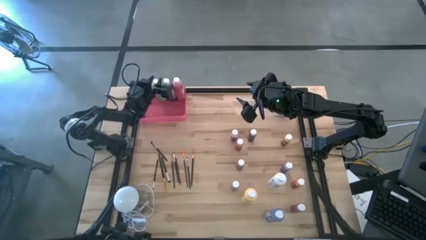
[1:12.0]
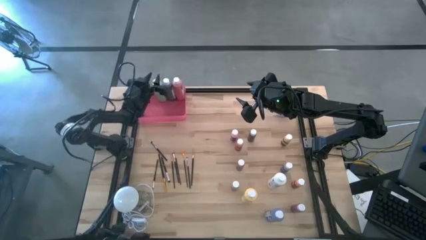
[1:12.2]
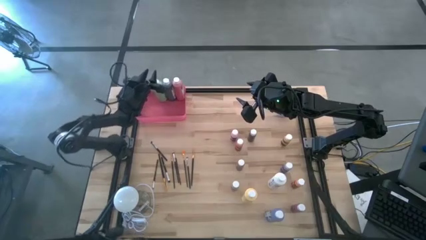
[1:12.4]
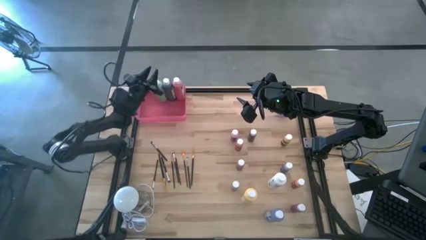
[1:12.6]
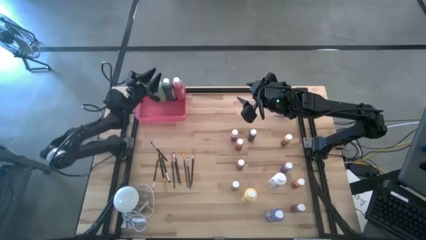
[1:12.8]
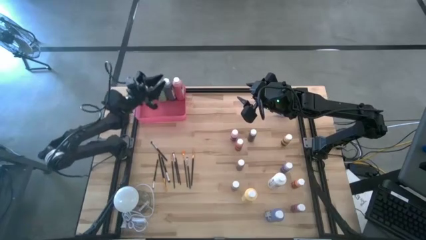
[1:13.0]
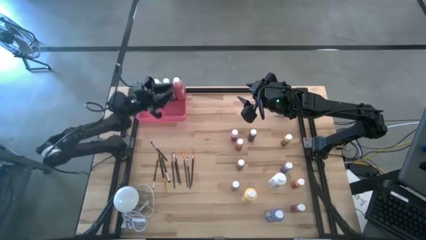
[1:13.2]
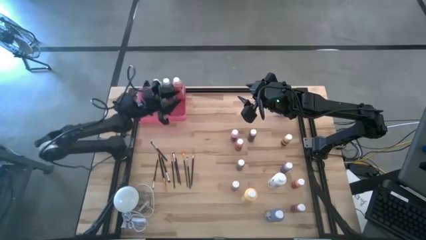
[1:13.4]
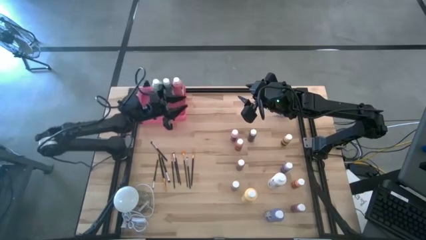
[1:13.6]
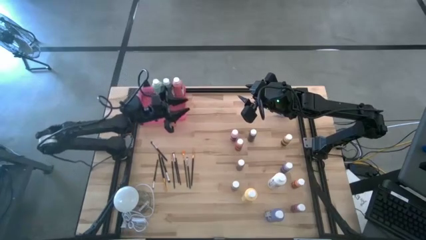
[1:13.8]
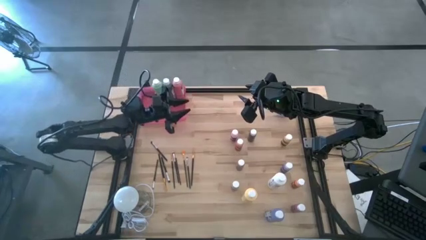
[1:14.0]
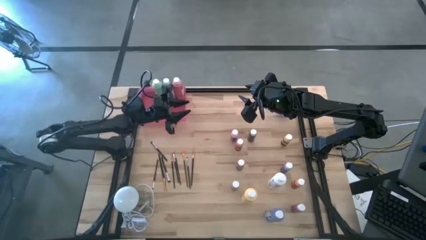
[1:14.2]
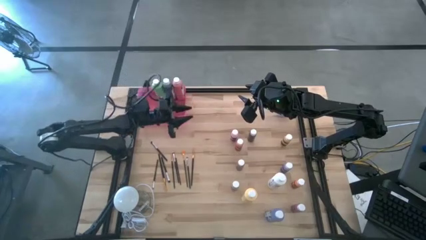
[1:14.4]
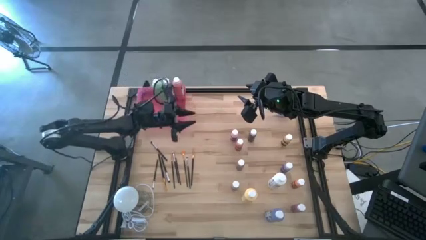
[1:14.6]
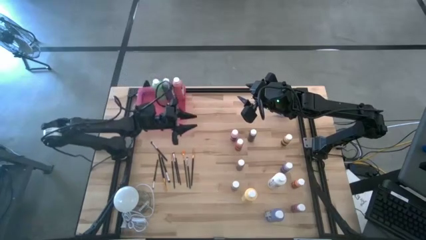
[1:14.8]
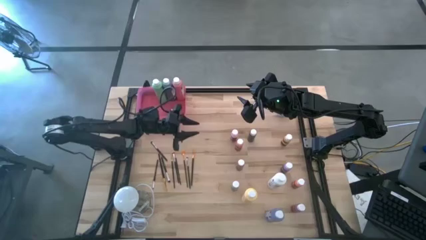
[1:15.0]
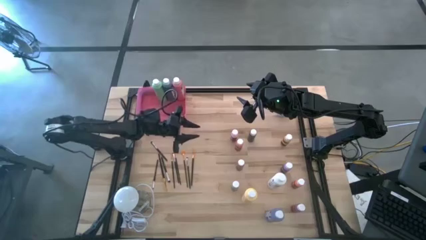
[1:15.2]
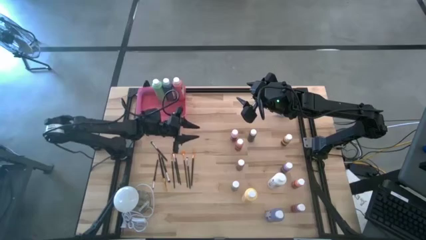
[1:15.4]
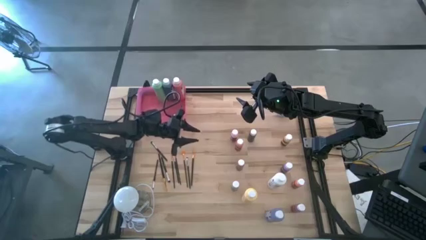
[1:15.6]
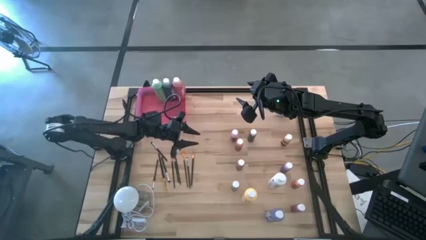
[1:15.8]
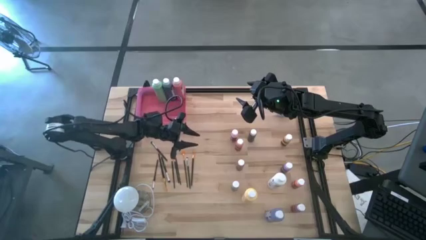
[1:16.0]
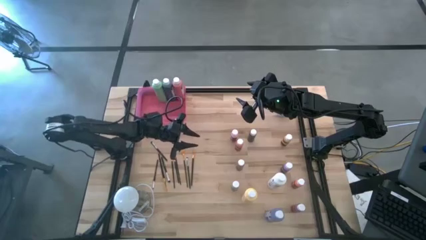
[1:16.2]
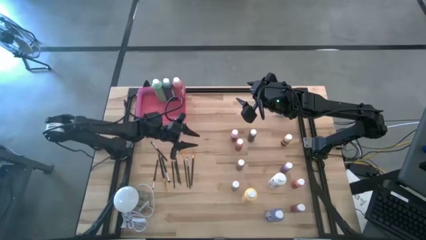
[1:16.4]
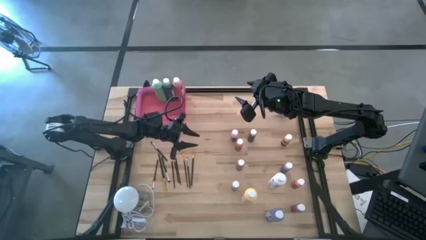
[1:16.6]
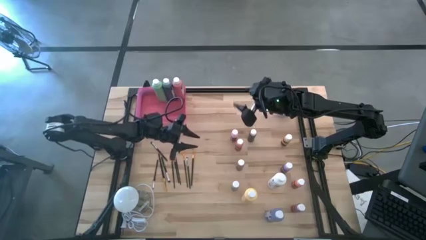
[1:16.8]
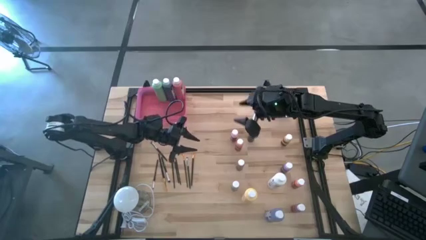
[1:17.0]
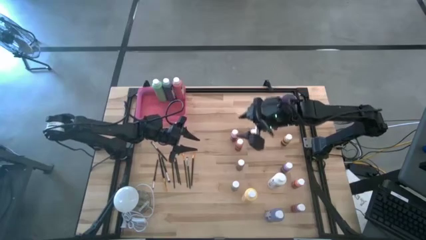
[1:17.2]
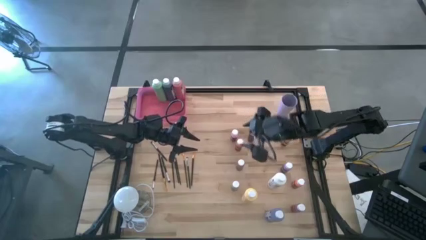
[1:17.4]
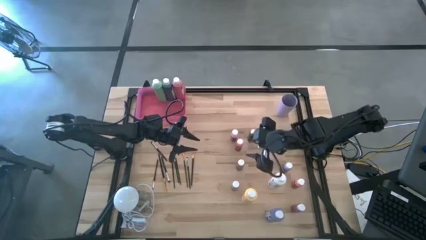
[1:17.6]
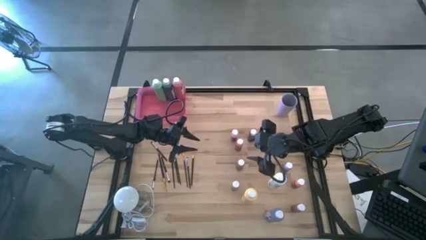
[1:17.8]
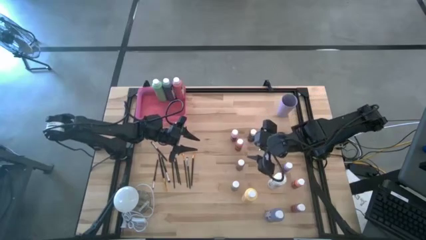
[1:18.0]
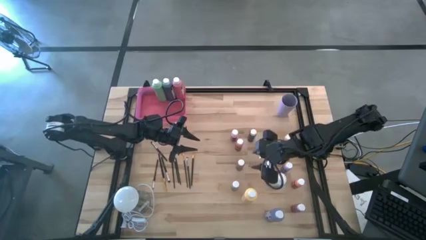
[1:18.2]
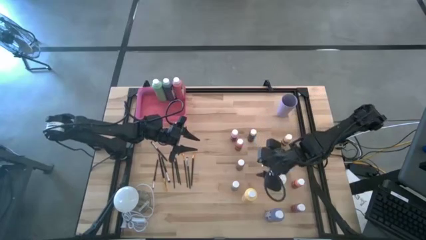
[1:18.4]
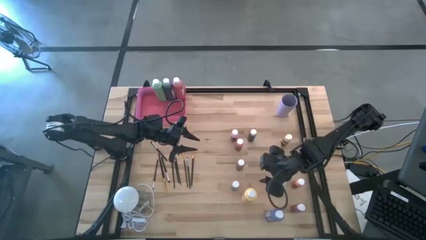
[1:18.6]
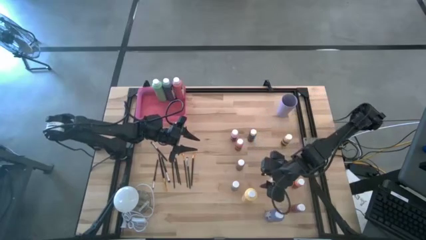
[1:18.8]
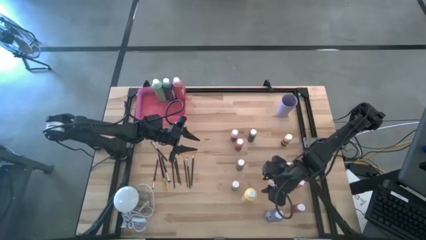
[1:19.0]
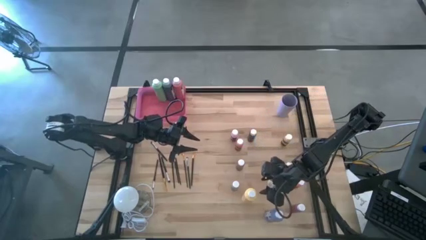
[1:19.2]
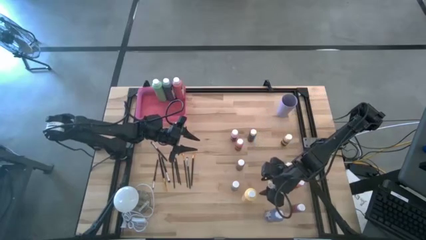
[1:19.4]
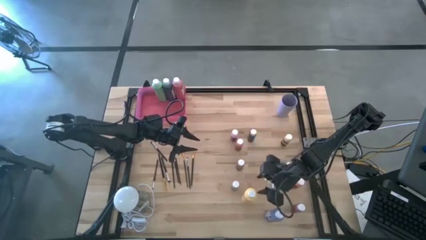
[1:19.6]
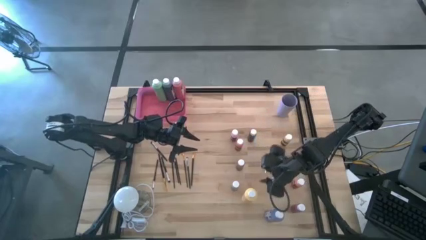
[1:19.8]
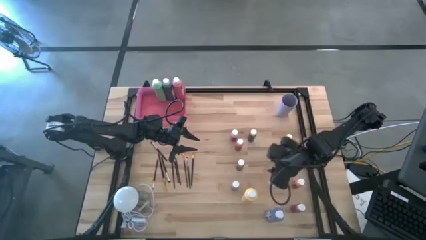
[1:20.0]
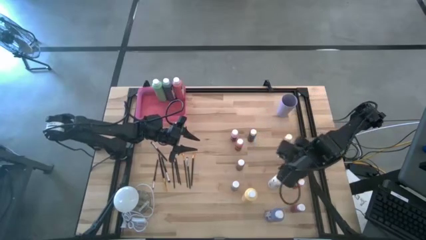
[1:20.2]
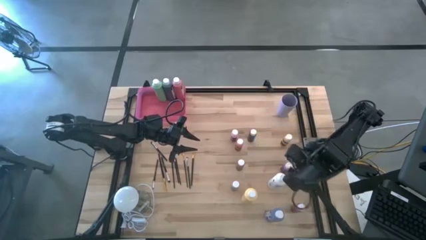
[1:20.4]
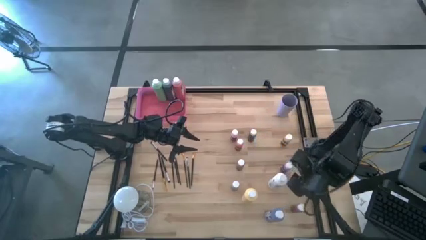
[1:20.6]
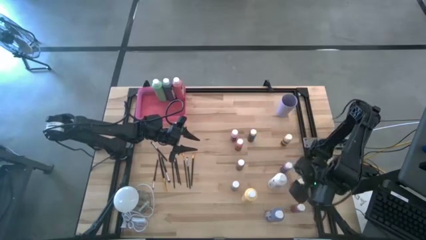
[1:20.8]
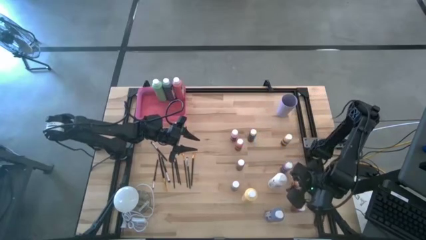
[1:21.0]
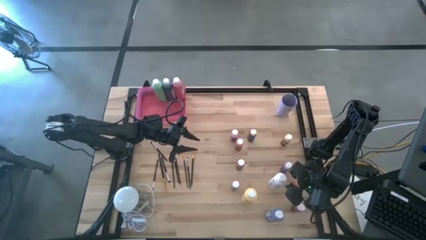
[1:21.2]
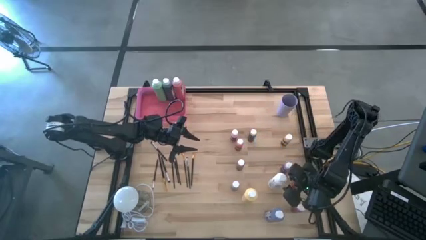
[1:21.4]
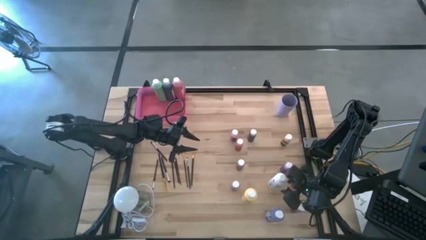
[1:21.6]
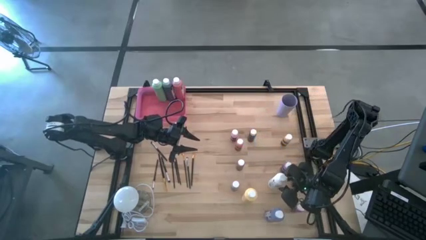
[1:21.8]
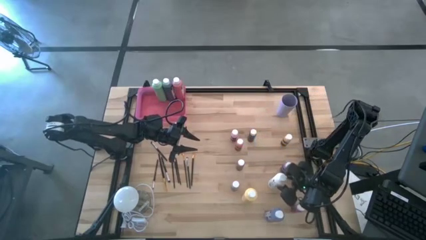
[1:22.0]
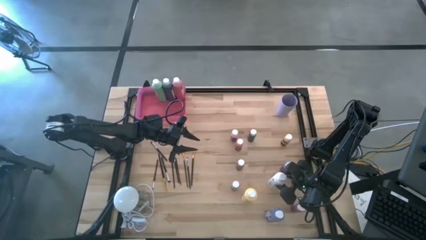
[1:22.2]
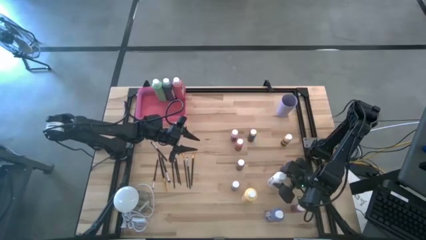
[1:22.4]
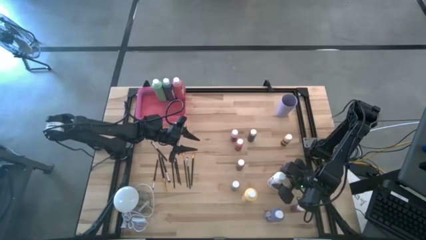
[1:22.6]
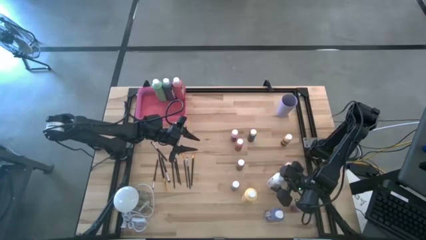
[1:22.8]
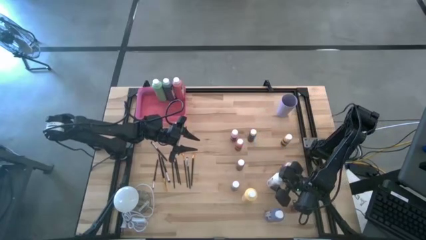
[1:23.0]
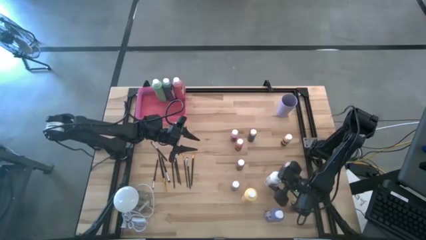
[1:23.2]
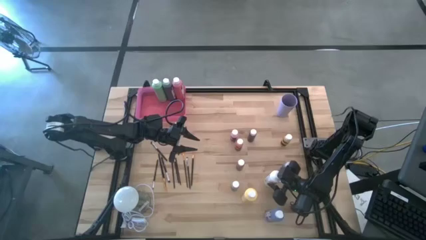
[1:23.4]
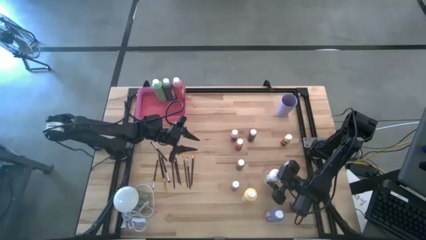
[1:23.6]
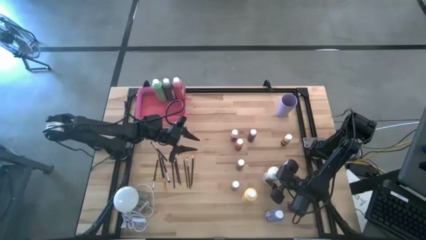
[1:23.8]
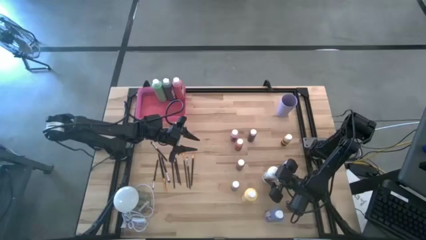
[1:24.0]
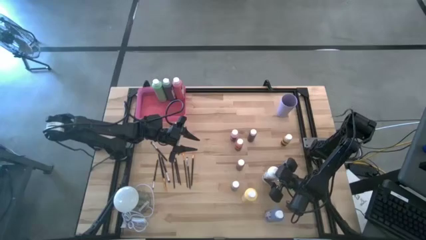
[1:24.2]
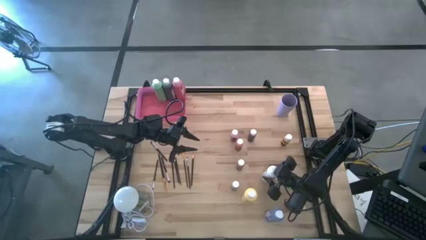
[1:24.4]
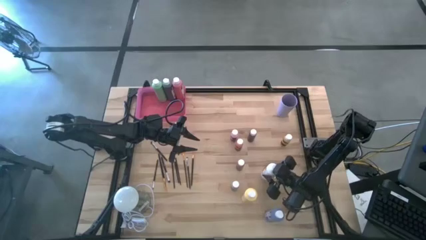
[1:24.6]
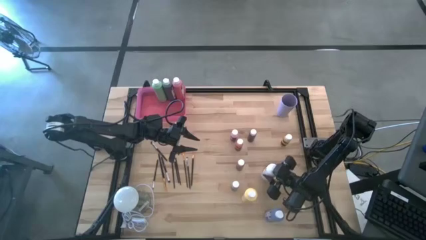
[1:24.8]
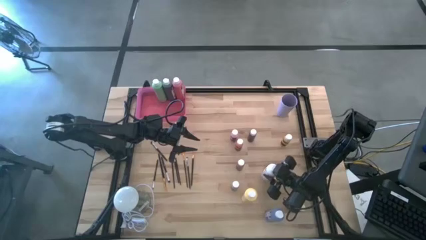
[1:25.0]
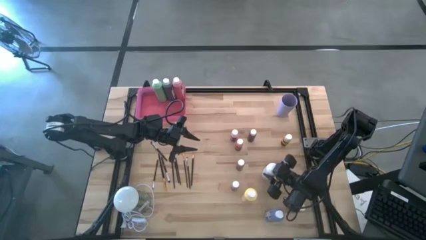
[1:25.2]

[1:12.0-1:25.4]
Task: Pick & Place Paint Supplies
Put the large white paint bottle into the pink bin

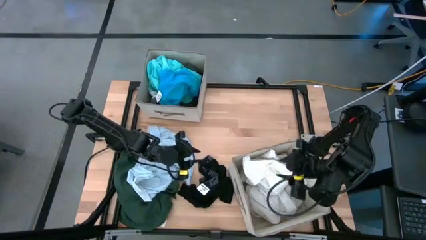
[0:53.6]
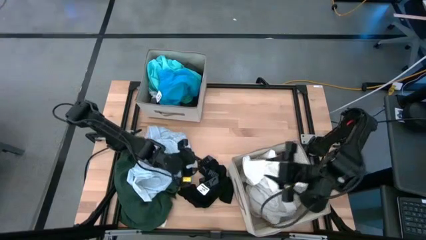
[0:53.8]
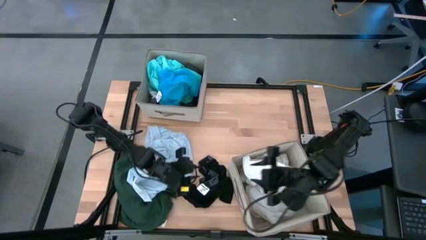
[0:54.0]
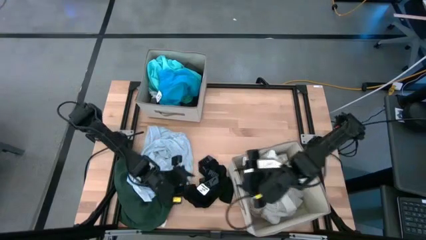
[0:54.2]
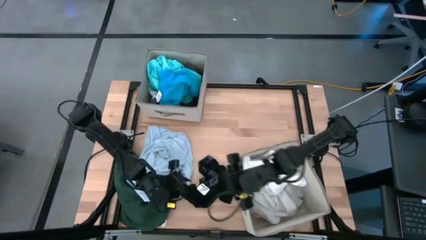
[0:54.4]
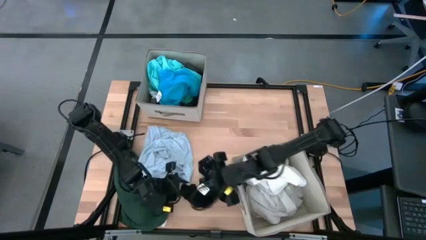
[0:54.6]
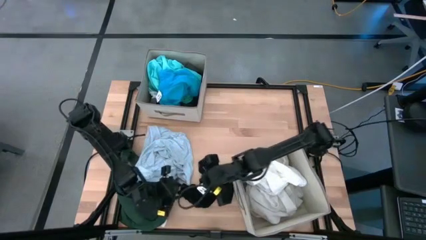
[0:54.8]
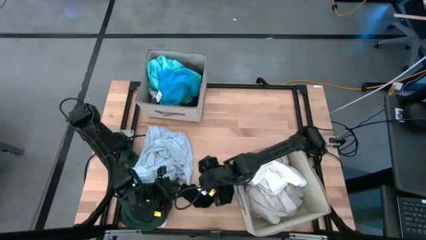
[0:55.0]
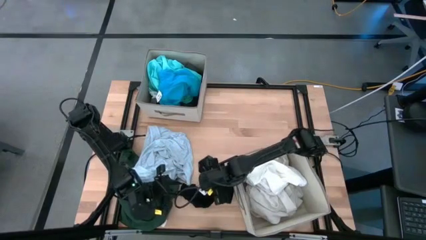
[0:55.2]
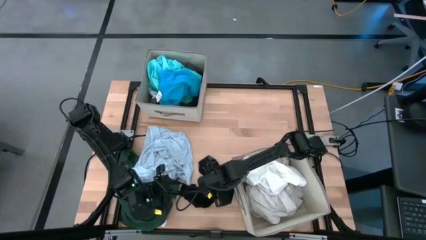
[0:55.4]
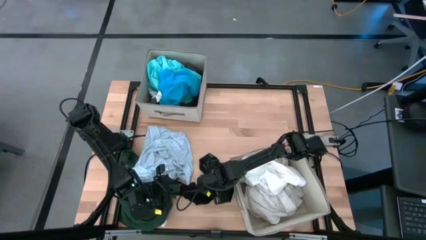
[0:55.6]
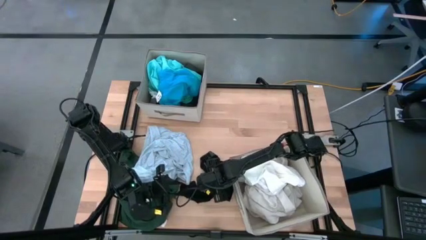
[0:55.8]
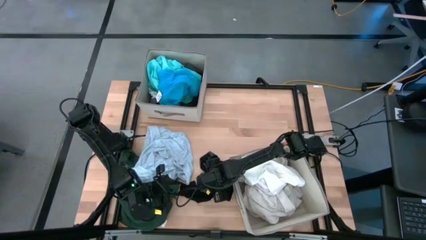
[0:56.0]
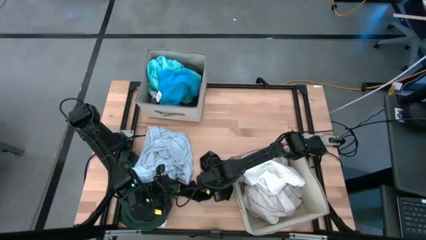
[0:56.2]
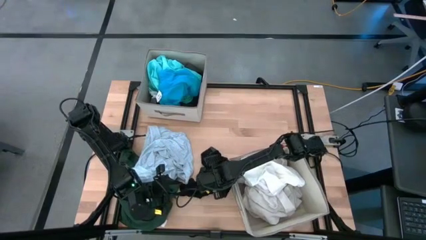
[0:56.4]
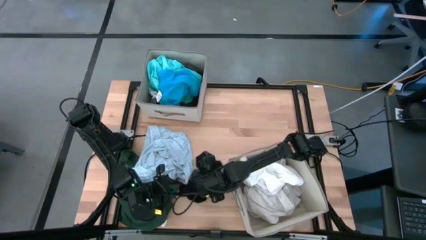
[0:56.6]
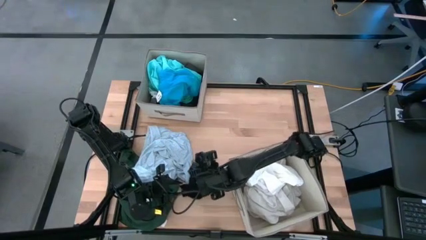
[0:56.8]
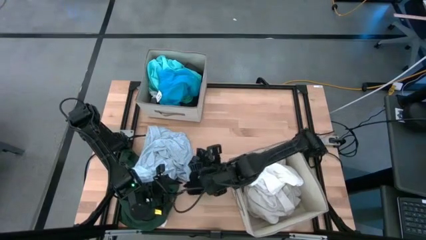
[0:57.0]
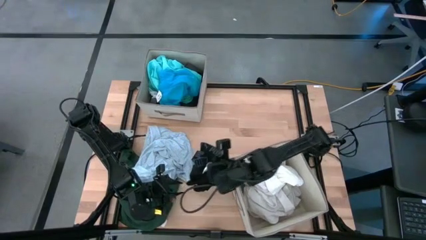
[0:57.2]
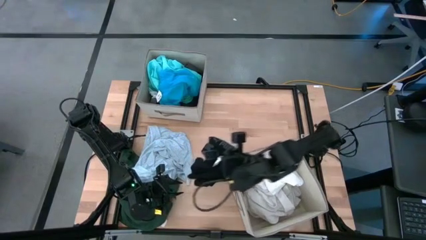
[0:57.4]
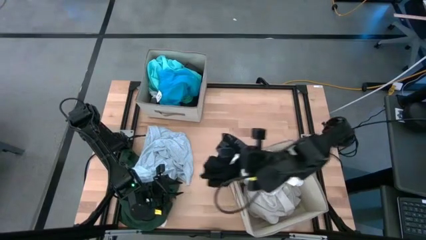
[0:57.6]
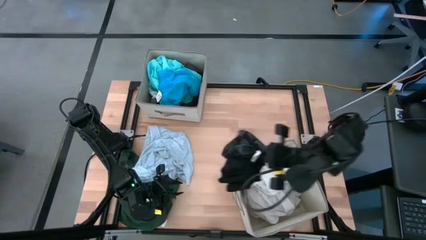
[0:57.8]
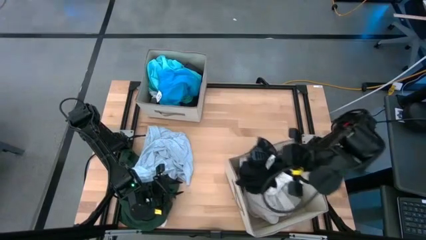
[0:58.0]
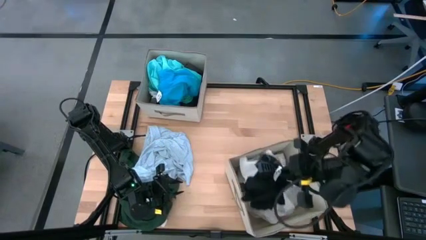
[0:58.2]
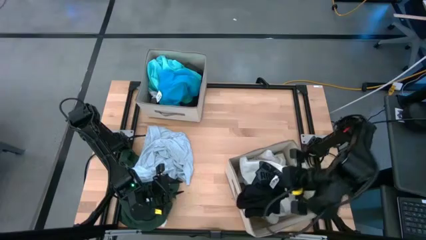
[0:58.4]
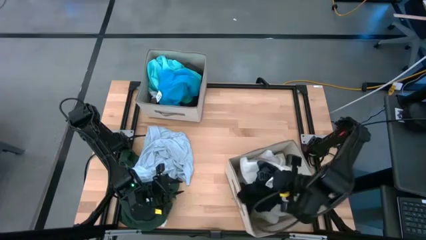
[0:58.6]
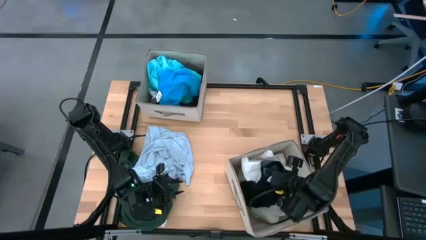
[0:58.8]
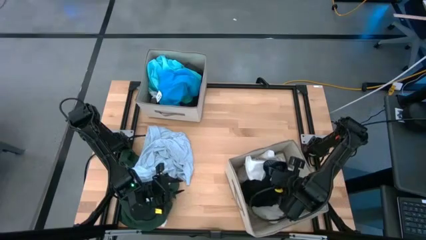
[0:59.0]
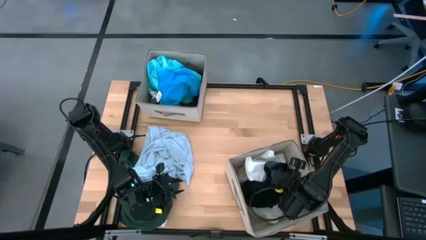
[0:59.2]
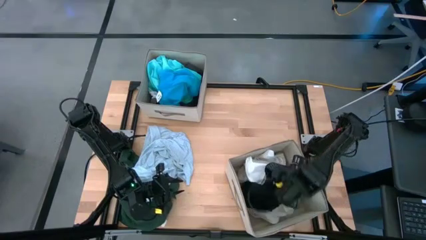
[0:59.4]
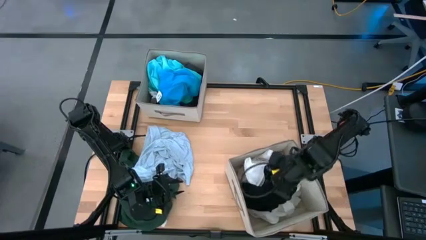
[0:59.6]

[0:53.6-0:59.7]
Task: Sort clothes
Put the black underwear into the bottom white laundry bin
